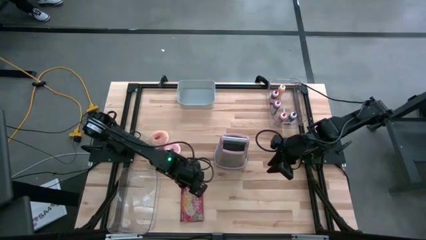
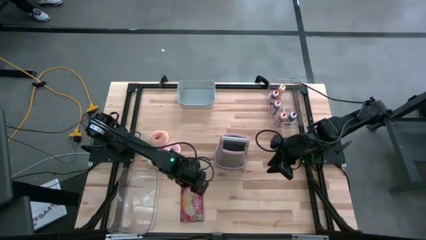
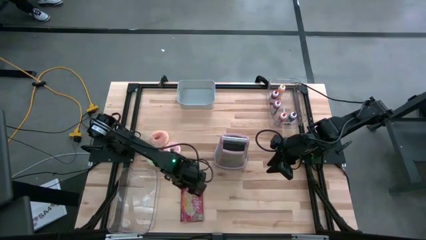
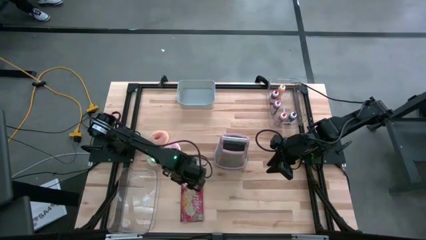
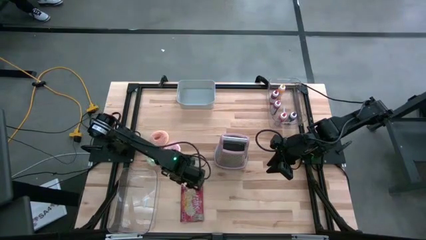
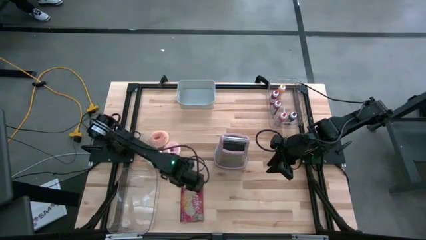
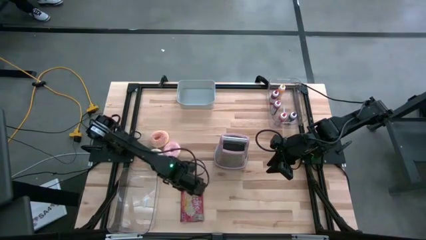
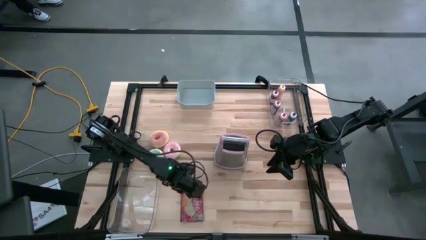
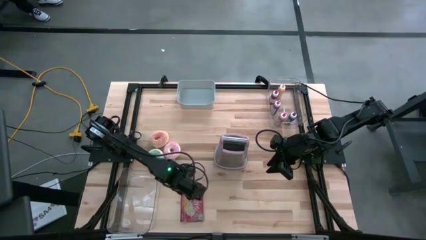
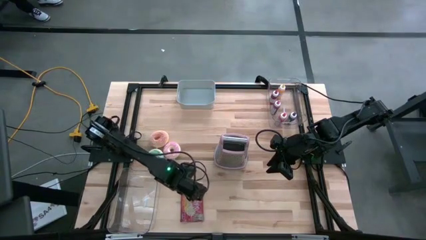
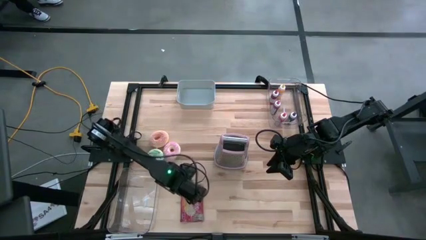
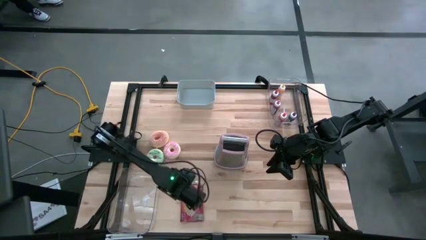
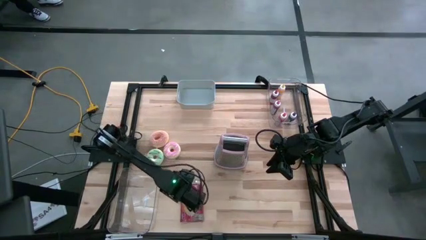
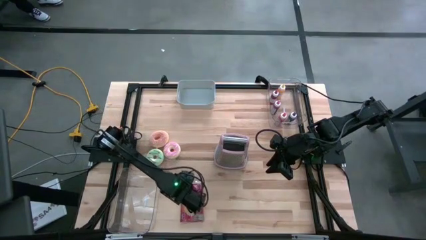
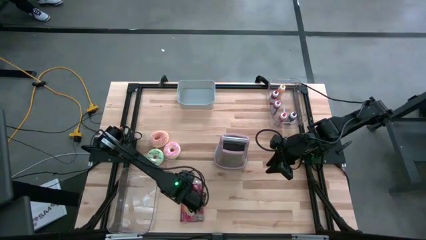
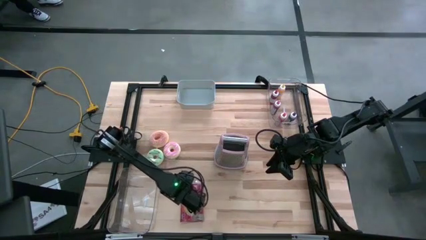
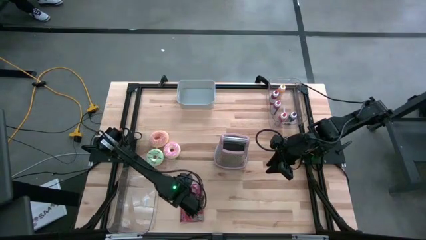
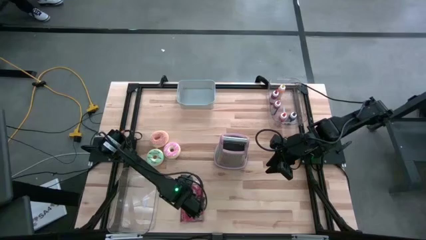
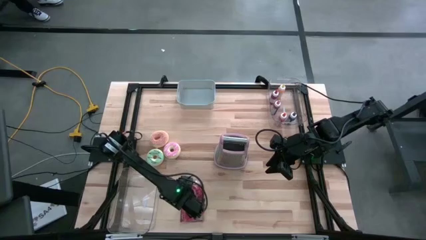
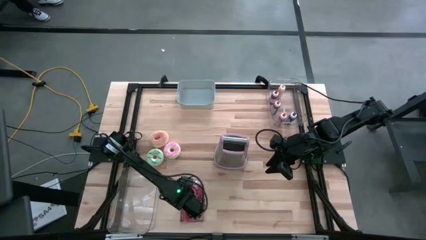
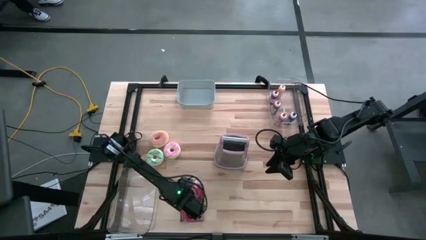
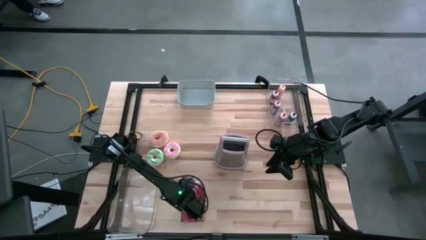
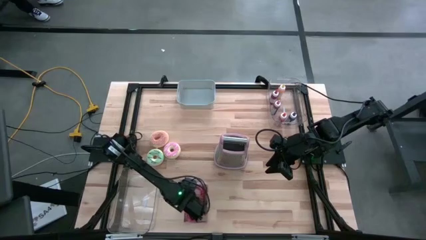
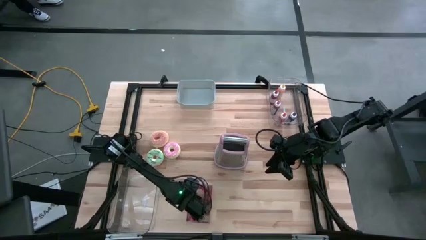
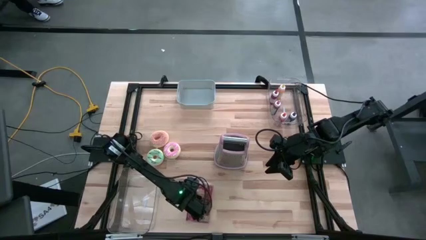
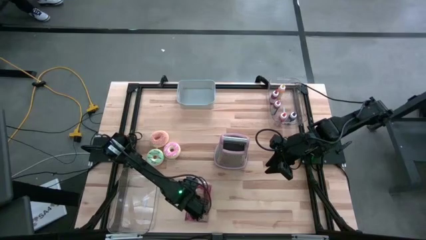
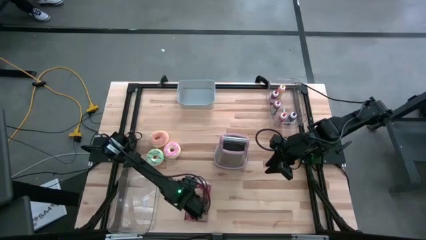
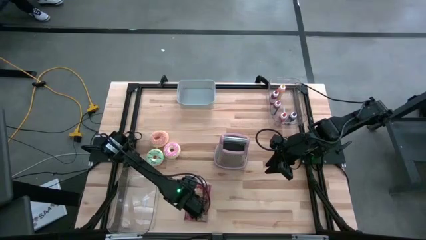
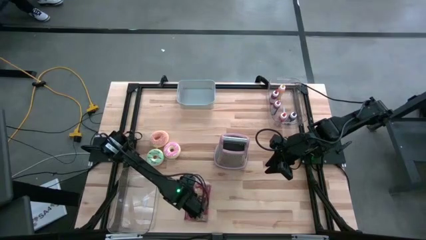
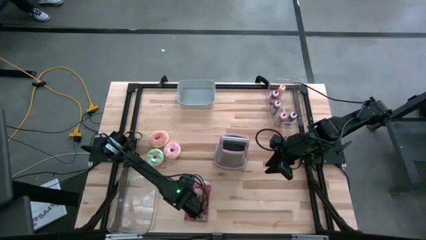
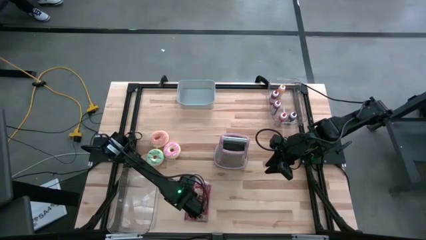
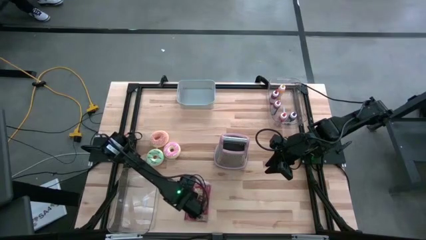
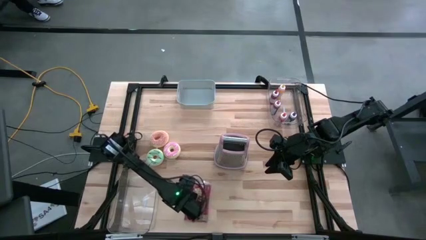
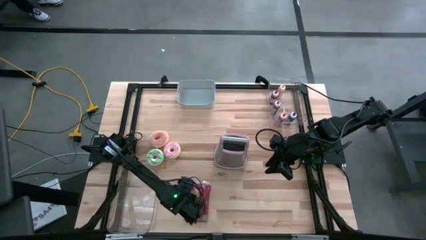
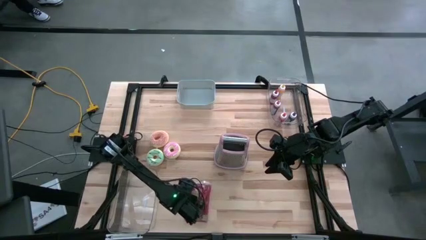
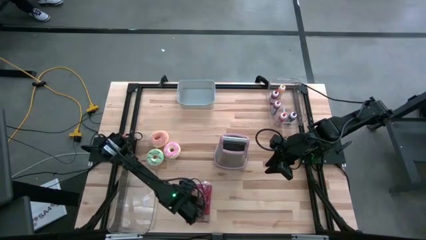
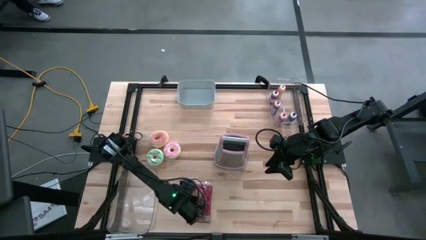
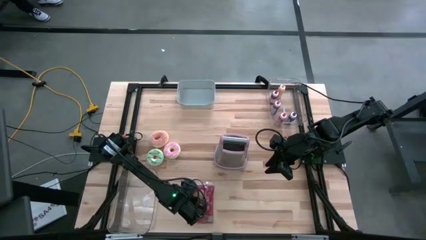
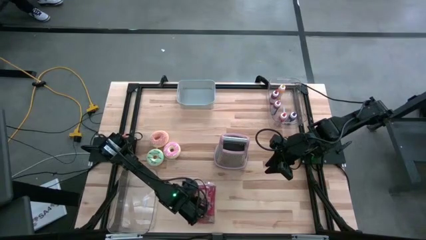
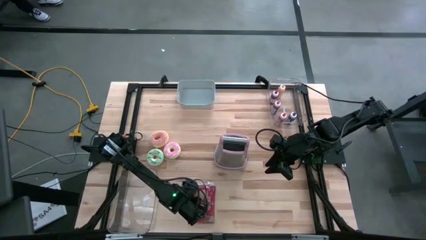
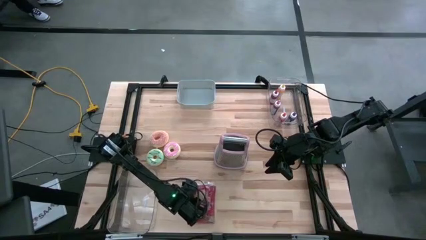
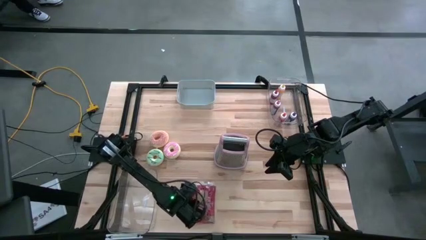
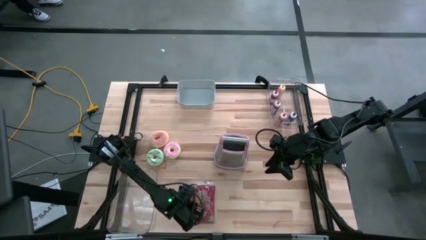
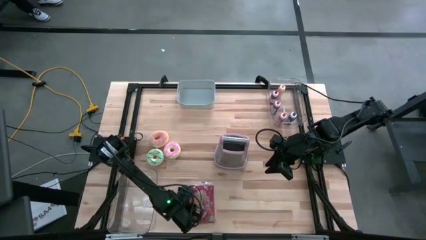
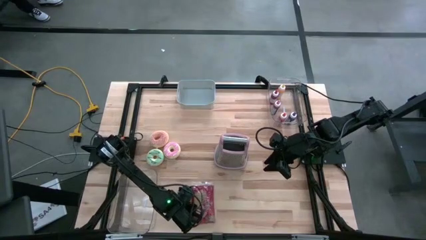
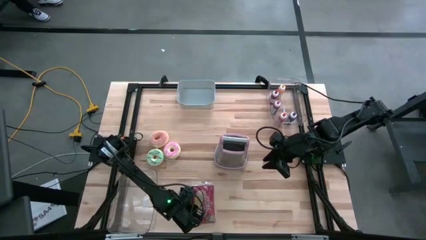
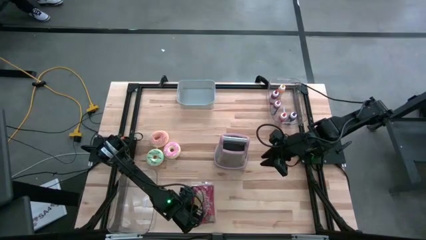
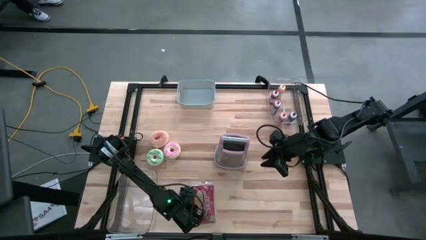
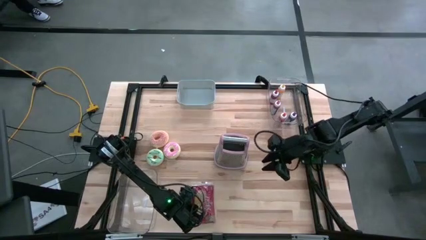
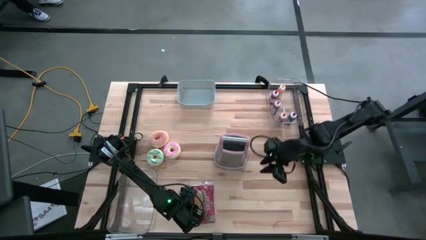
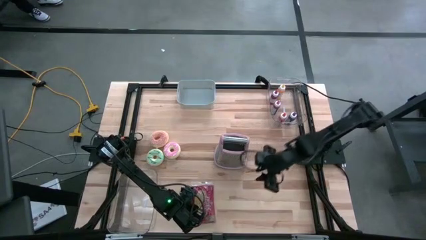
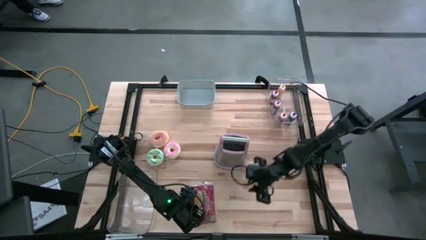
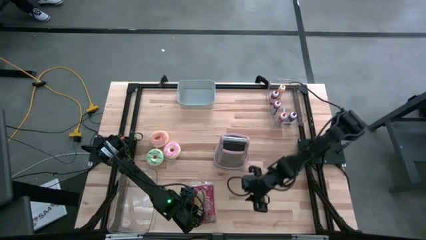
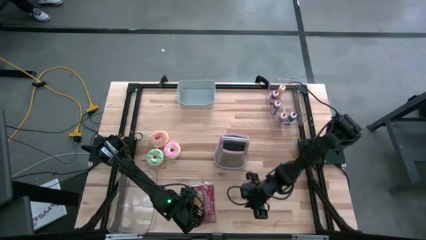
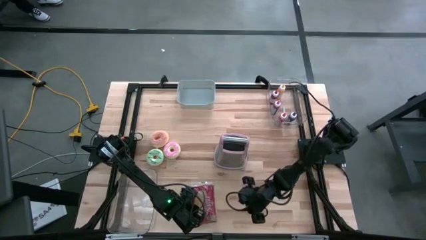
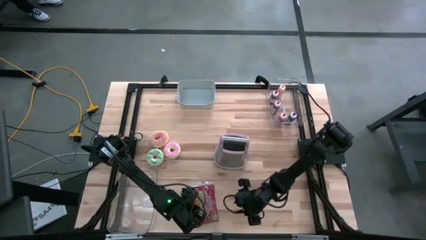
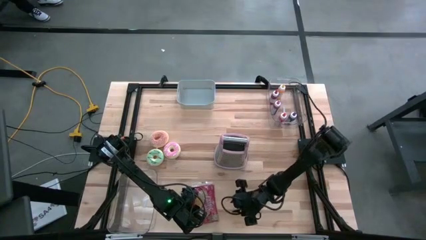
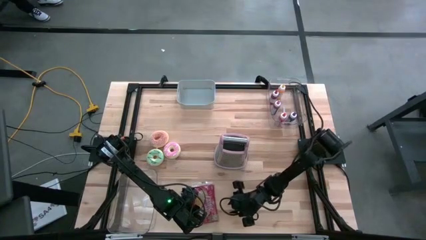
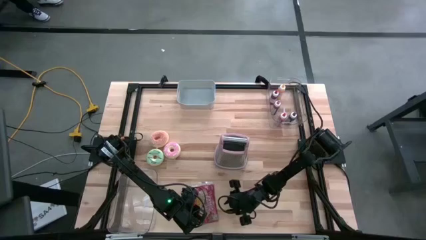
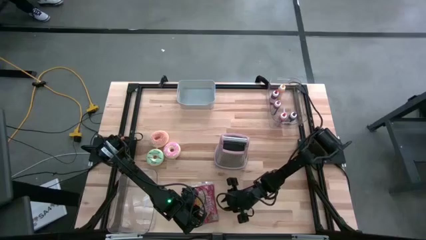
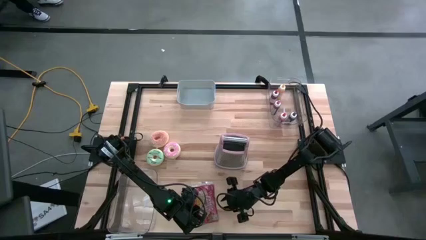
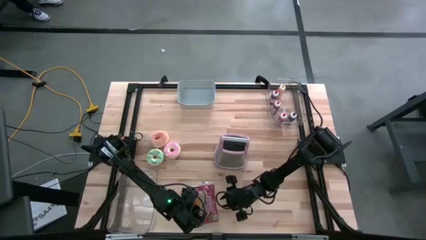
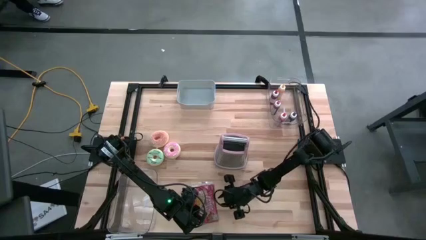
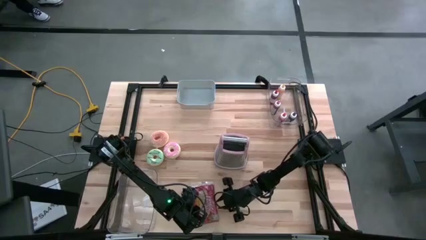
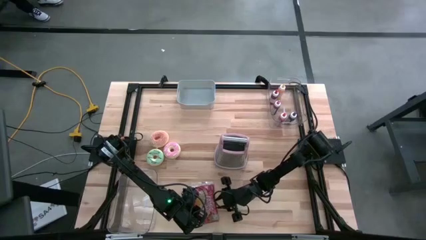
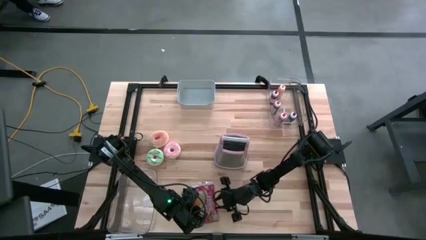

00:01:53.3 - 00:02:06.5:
Put the popcorn pack into the left transparent bin
